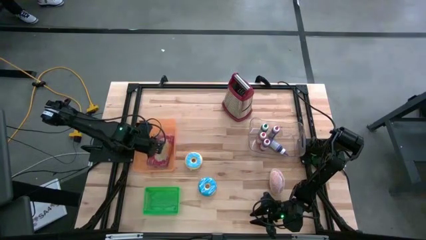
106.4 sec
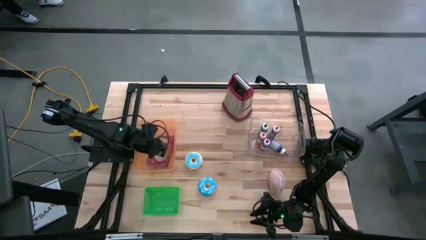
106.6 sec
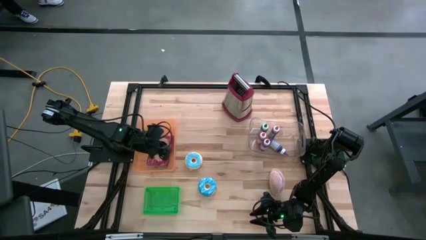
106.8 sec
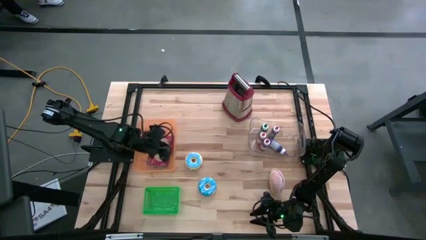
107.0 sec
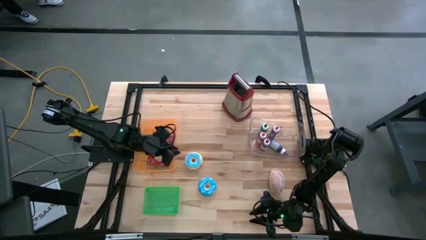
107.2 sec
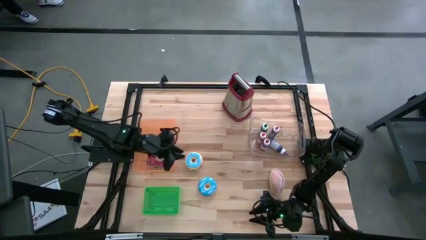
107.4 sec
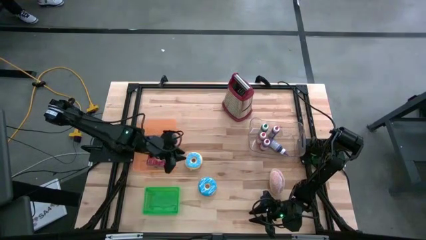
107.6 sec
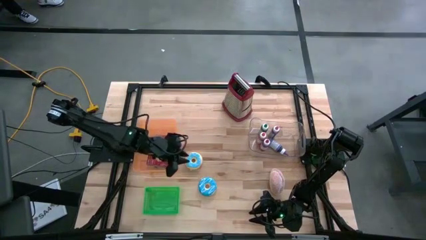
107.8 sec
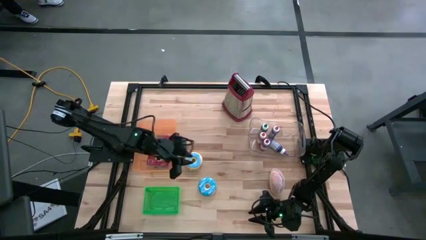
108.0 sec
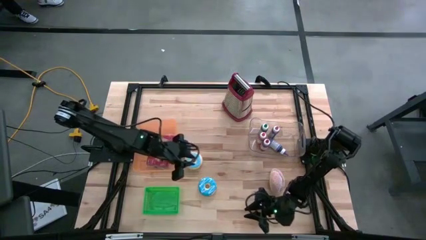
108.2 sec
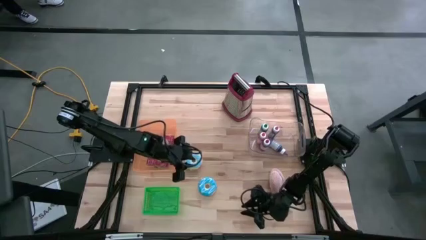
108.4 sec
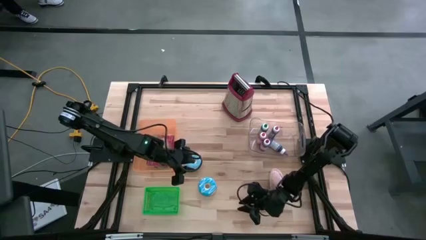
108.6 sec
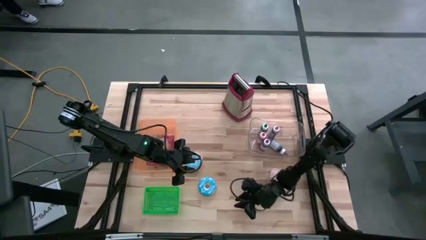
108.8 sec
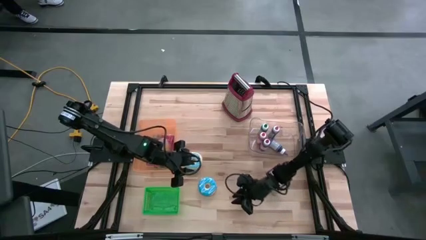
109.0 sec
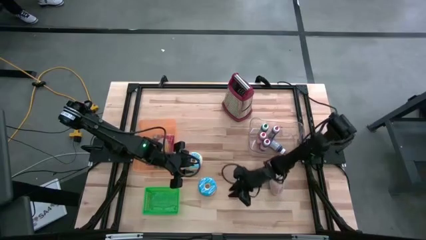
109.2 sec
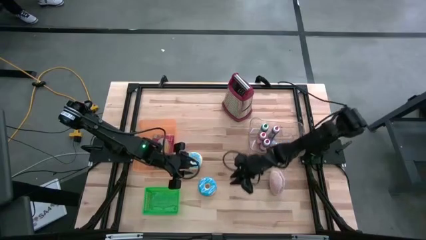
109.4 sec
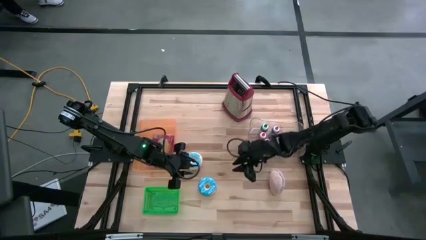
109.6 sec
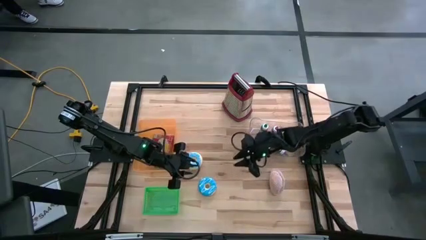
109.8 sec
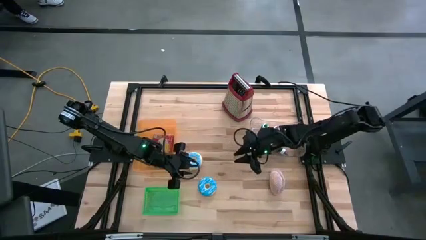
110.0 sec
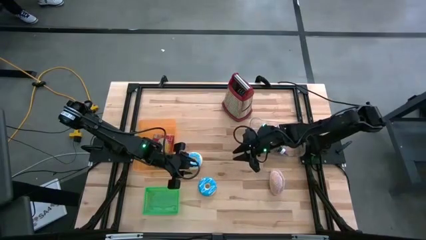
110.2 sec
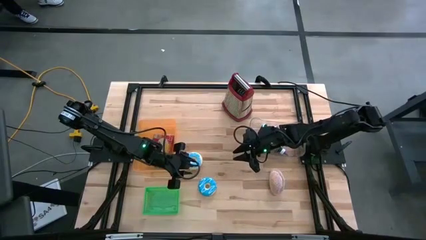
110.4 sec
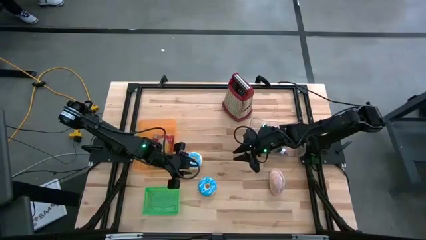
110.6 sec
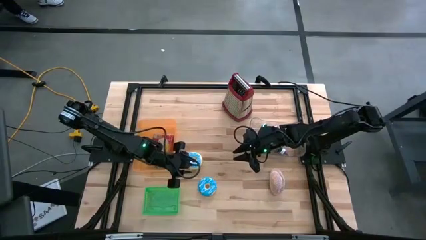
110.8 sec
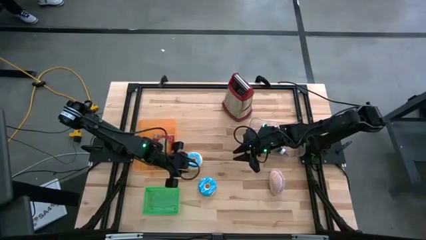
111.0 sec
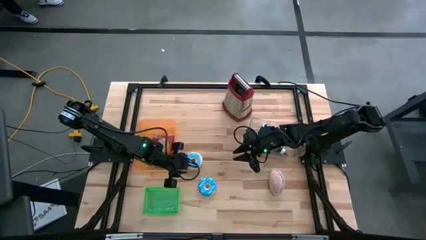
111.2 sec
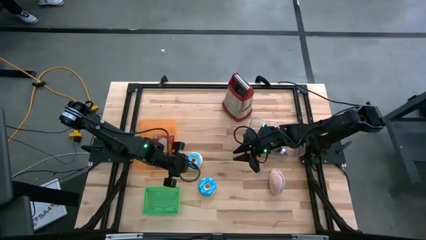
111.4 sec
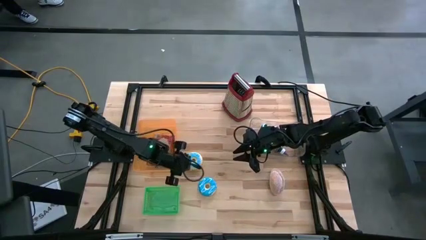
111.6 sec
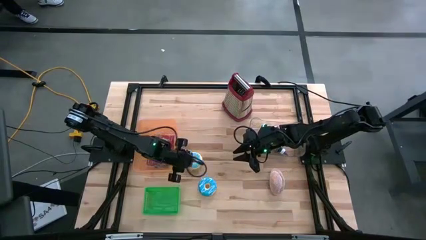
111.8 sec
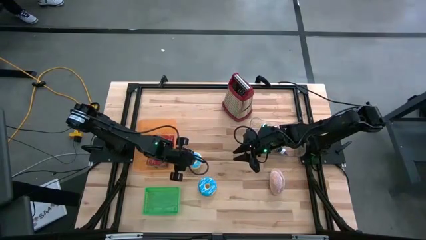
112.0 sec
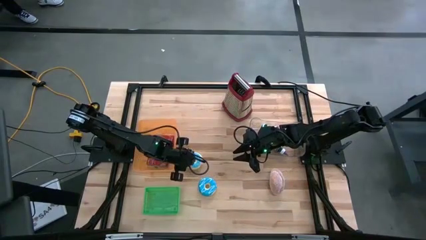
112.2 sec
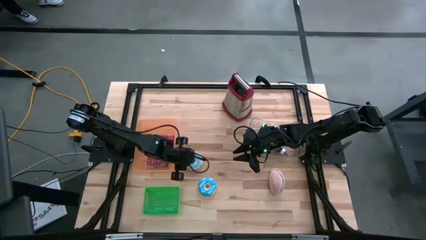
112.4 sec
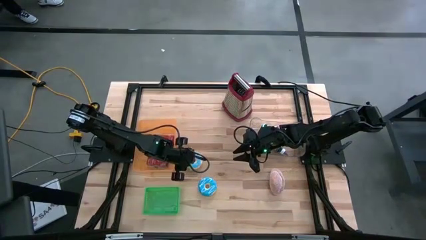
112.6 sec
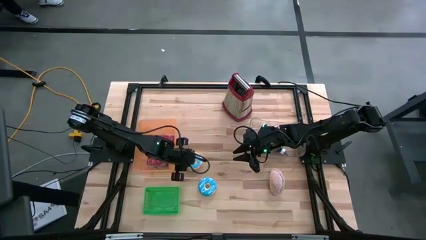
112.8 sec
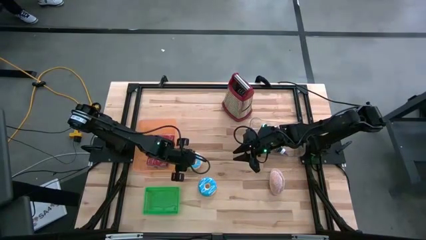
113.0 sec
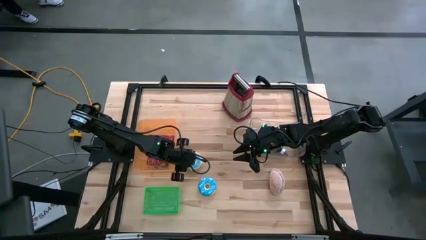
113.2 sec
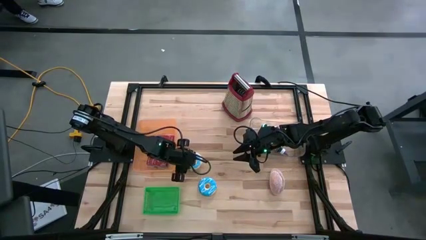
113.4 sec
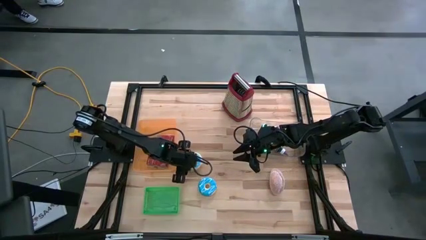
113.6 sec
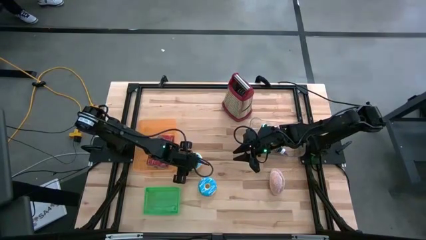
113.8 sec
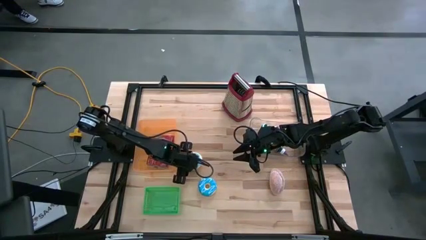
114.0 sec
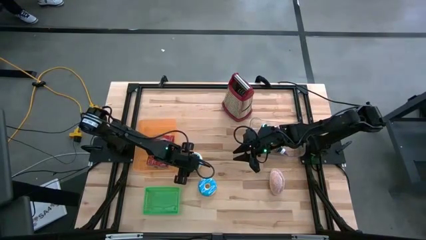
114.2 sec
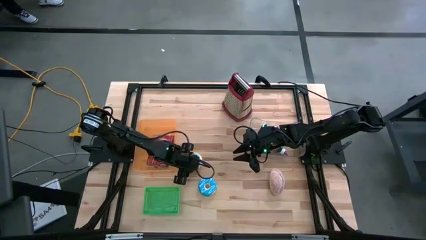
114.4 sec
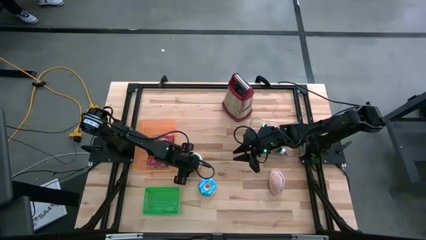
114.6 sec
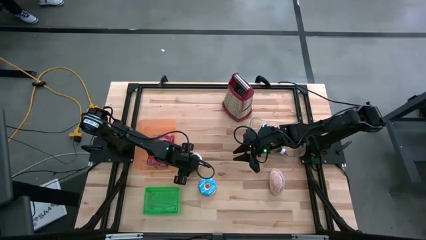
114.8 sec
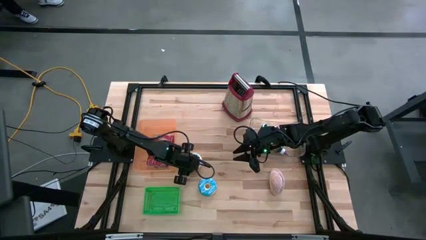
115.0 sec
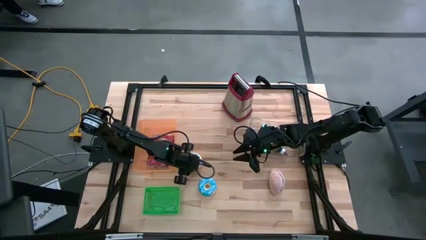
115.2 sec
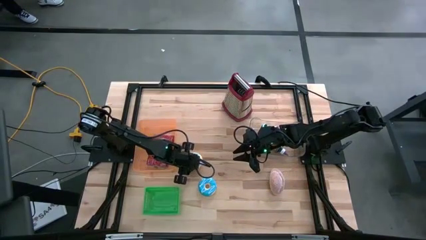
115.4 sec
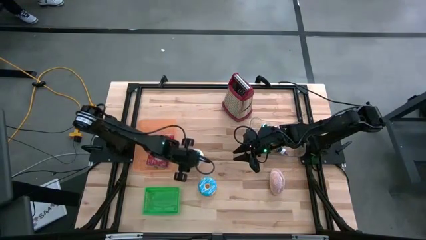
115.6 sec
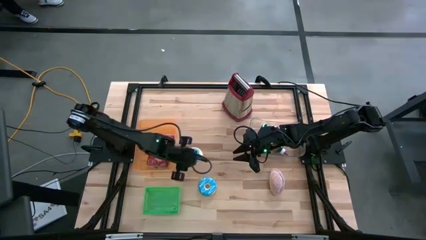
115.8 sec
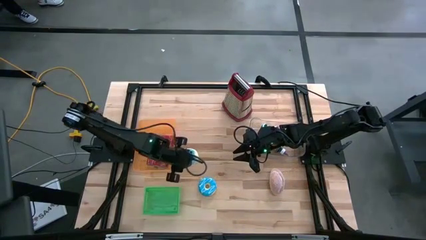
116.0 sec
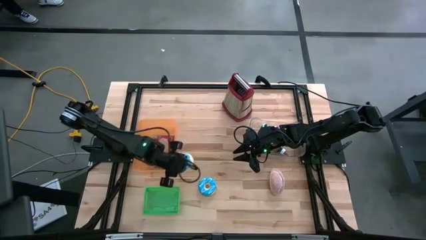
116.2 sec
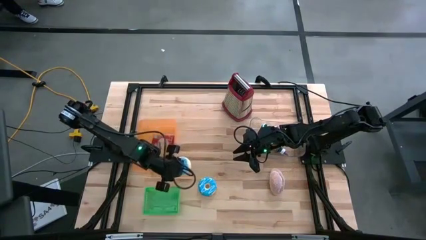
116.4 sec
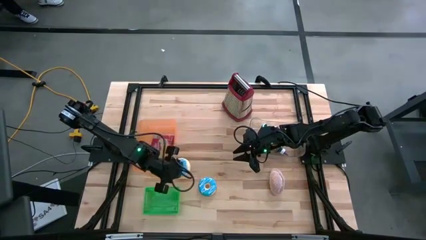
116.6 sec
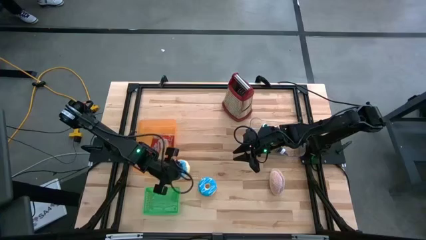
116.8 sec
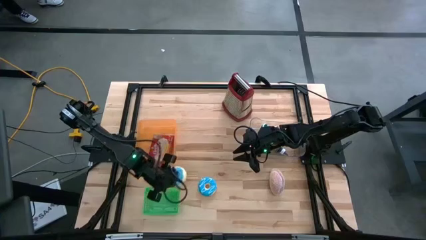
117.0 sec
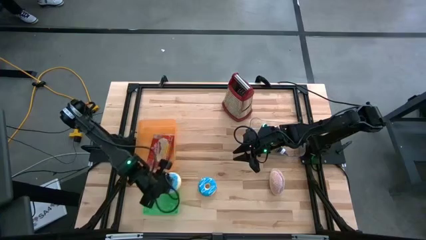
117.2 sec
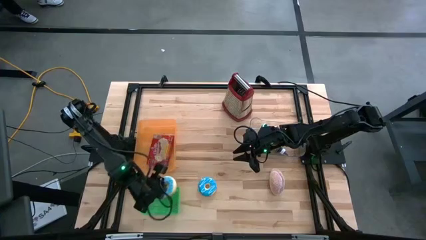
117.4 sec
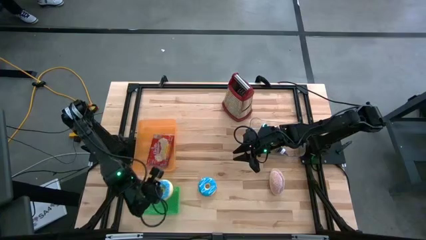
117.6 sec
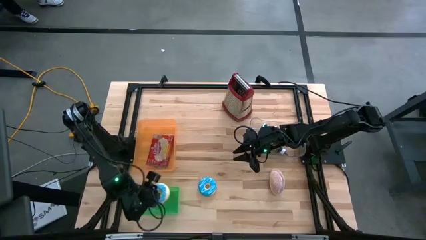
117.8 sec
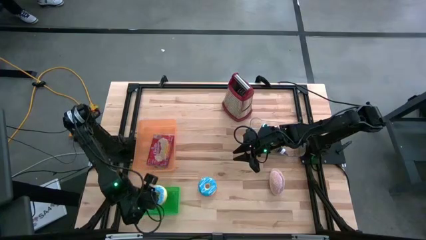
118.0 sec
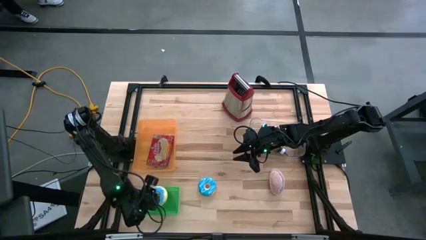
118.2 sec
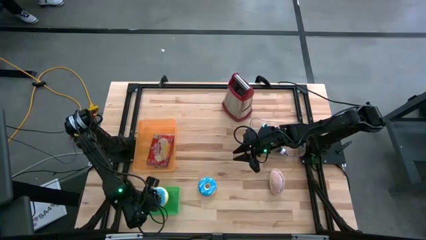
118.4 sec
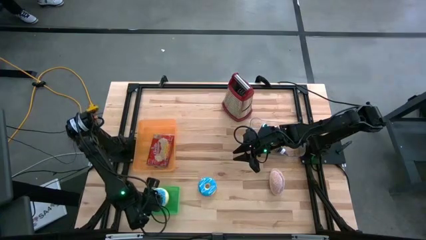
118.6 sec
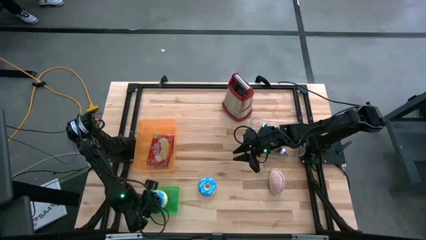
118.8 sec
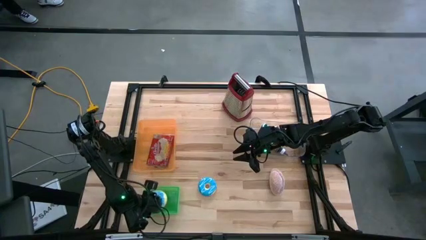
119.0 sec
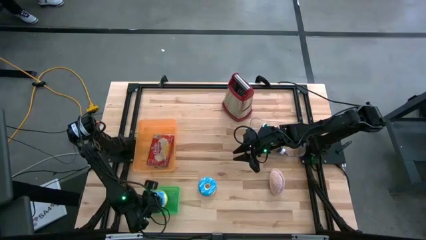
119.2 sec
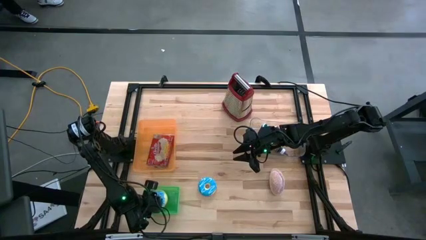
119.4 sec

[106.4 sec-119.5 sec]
Put the top blue donut into the green bin
